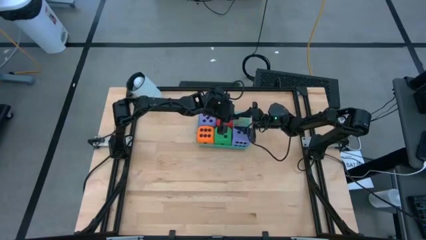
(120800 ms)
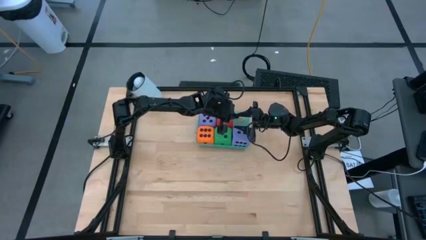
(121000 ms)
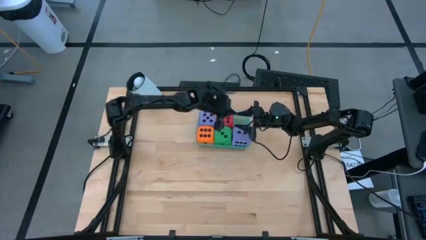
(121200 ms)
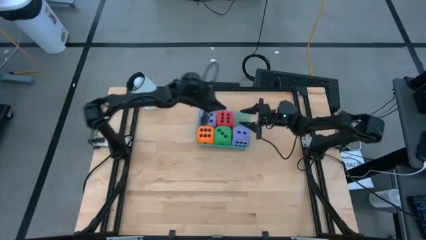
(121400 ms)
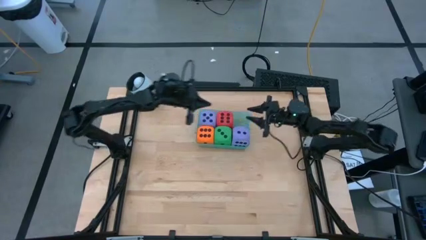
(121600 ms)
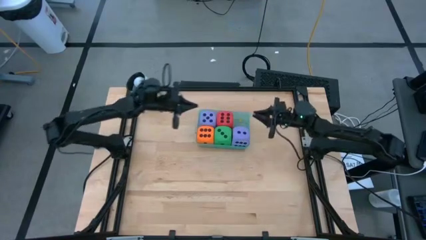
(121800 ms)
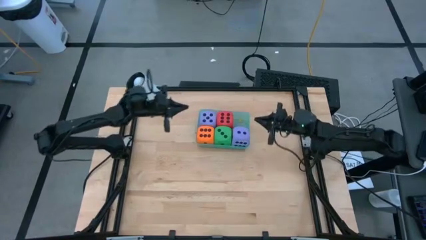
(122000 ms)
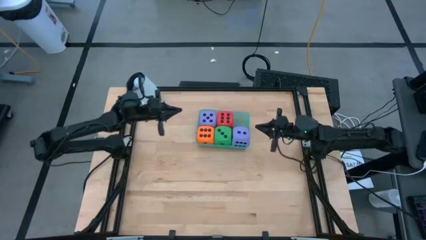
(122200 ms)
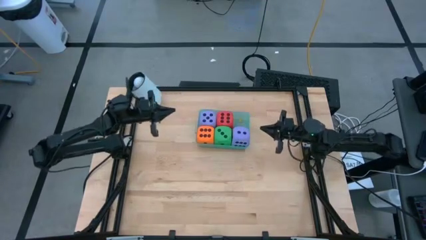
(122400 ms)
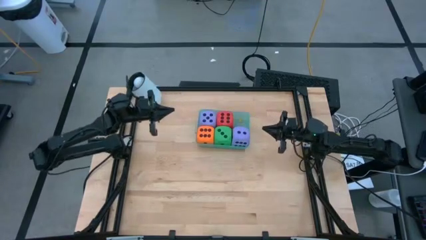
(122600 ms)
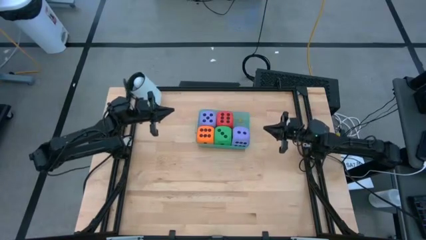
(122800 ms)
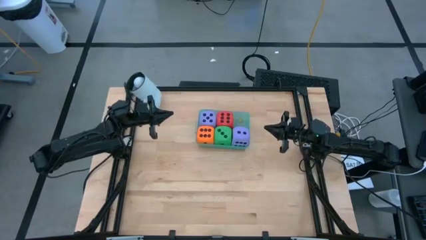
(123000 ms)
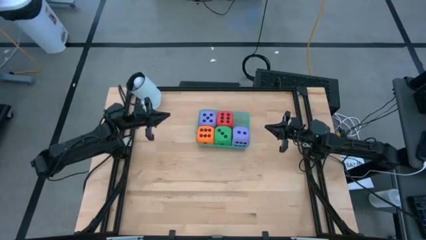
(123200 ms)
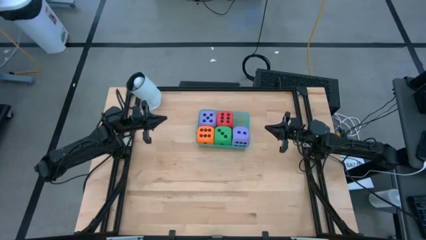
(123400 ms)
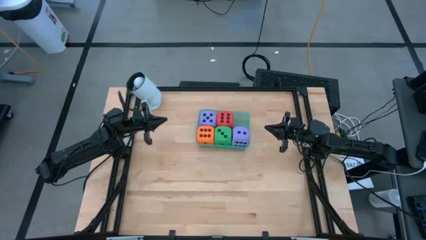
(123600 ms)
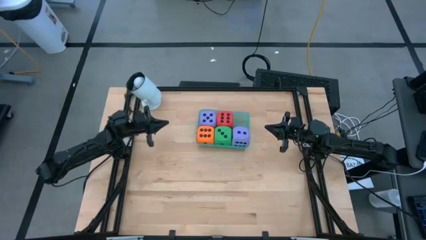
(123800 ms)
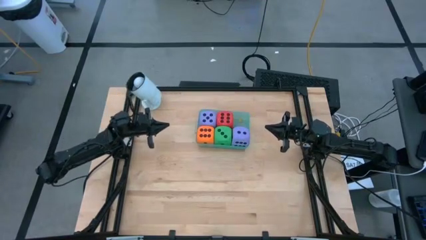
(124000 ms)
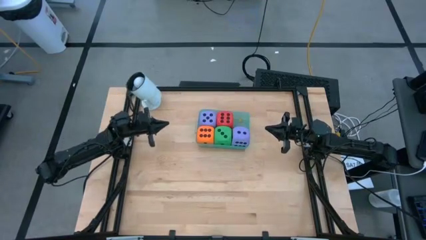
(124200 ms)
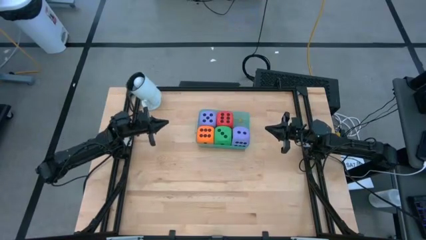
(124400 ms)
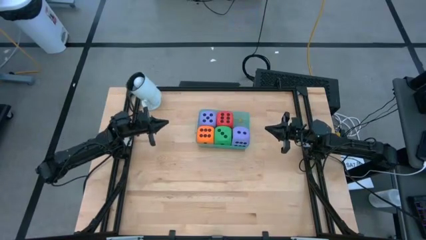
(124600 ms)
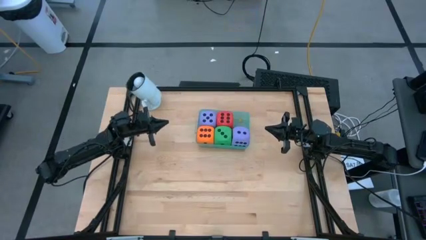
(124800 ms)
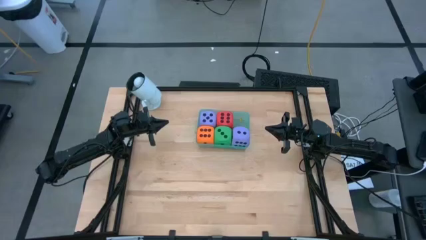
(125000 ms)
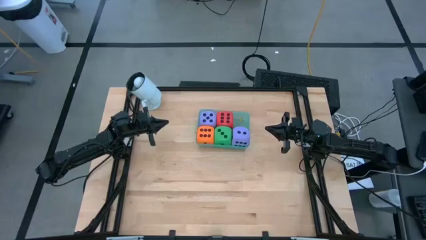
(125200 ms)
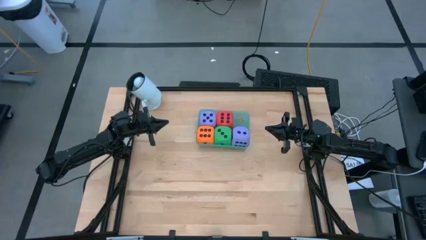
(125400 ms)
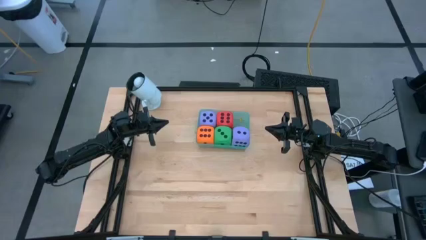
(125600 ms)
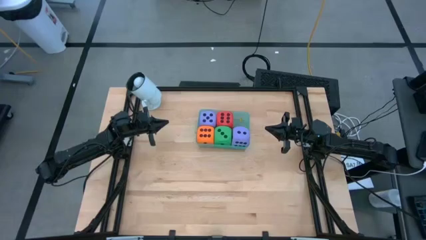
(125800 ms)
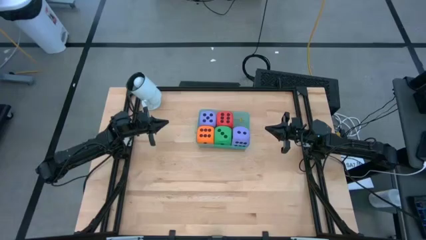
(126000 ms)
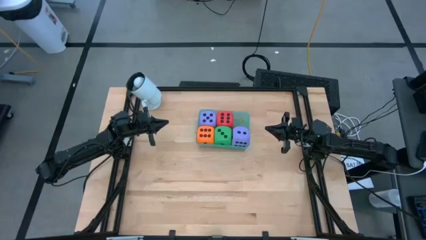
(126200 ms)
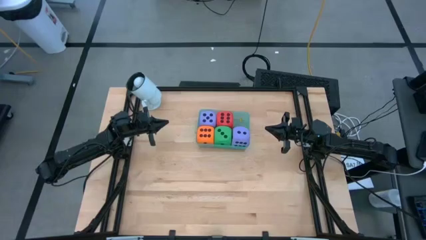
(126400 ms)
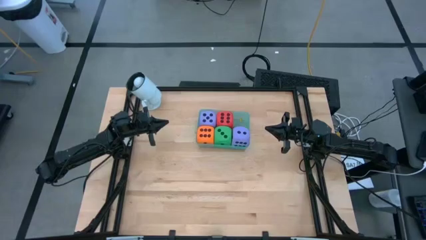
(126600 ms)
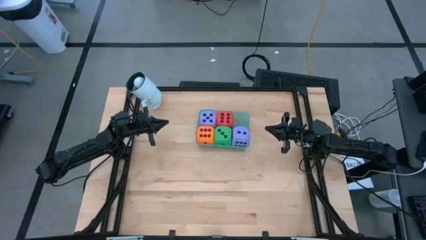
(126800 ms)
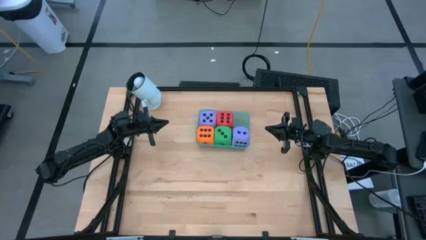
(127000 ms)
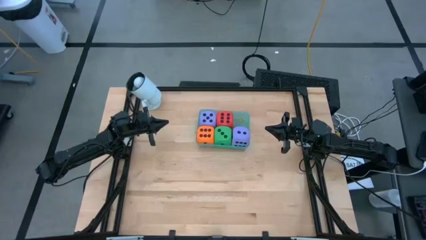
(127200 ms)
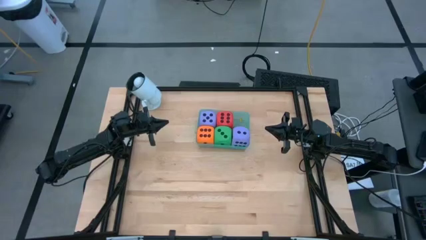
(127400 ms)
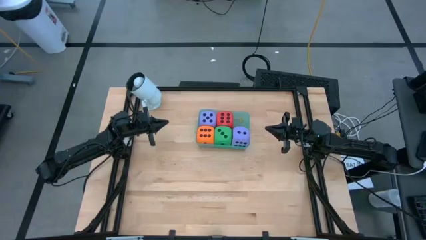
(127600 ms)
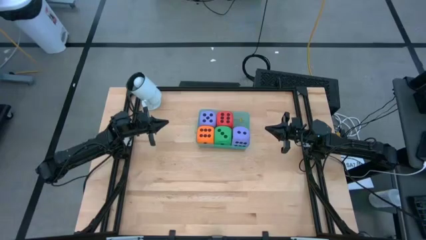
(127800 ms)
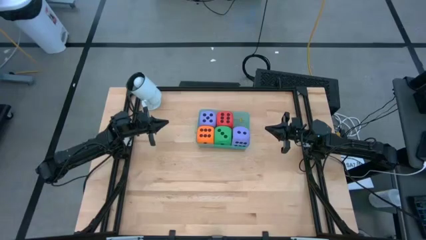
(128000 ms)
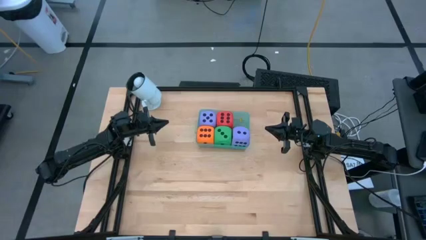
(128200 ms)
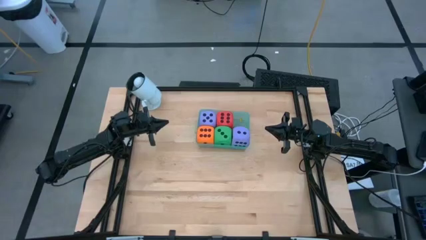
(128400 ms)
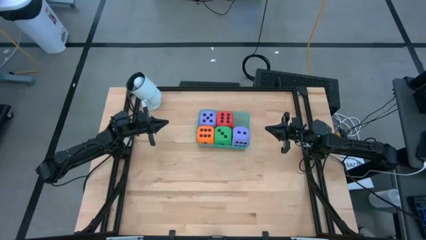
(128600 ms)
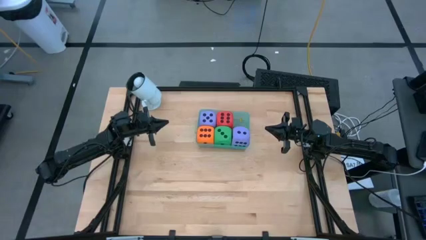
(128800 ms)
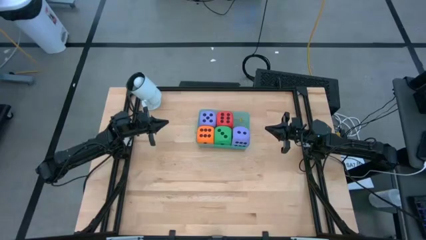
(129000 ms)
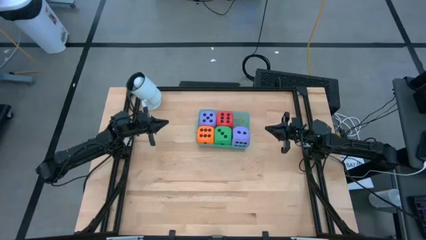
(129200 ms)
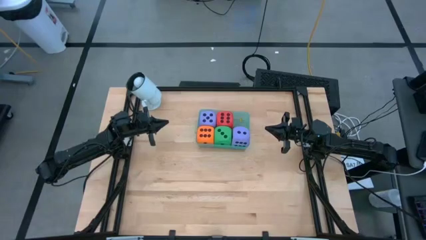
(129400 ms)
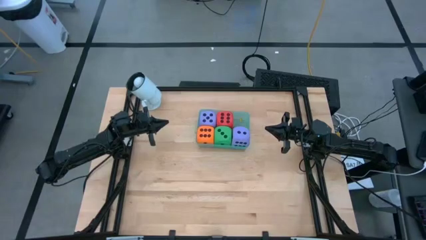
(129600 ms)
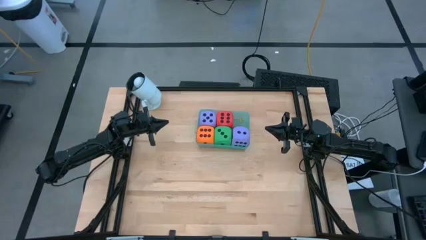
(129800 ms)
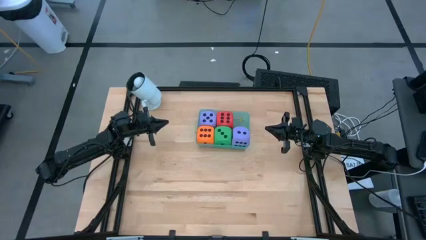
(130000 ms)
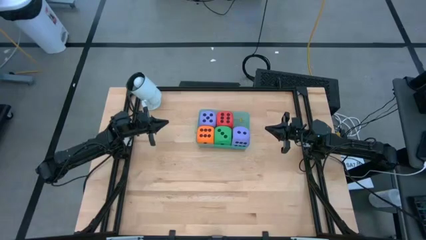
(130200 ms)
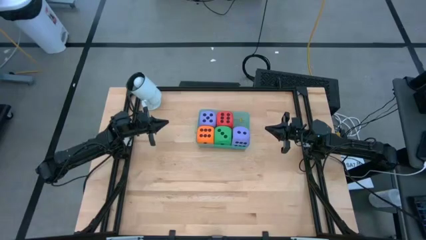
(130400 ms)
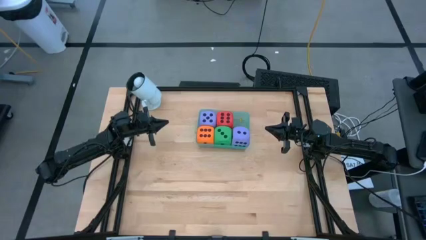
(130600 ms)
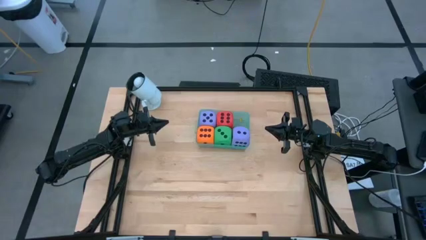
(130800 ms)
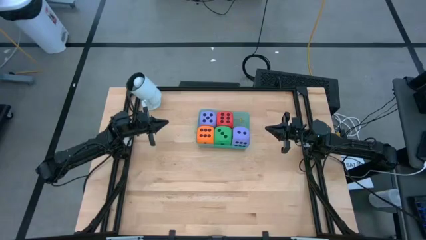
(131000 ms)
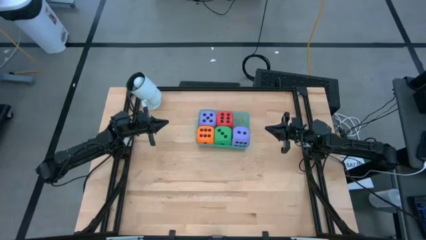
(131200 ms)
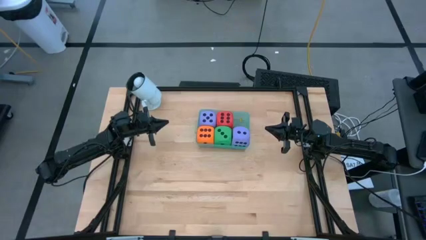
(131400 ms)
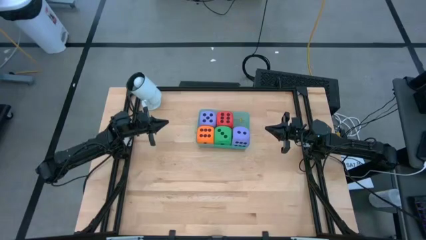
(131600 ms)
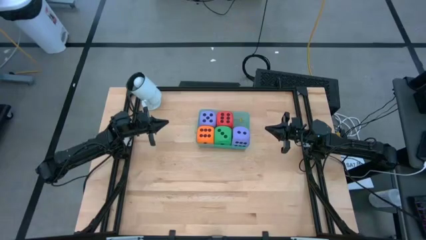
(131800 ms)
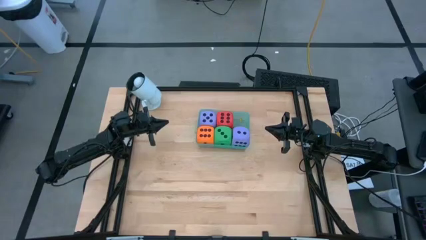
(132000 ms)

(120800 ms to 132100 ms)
Task: Pick & Place Dice
Return to Home Position

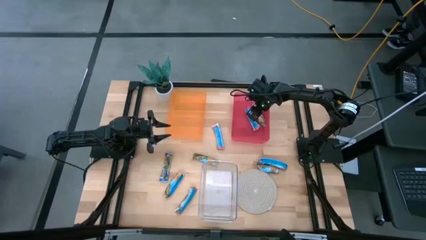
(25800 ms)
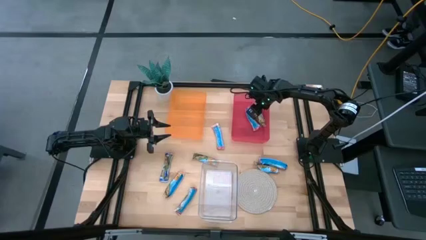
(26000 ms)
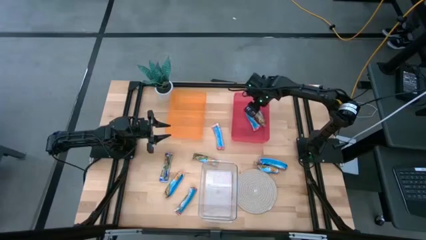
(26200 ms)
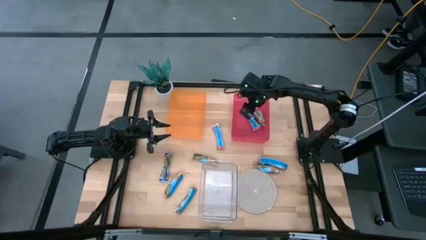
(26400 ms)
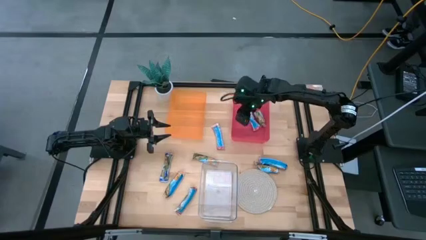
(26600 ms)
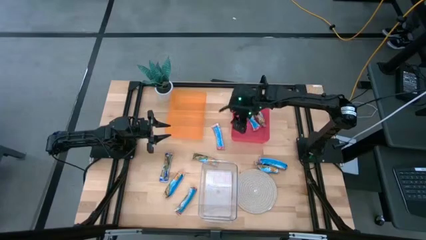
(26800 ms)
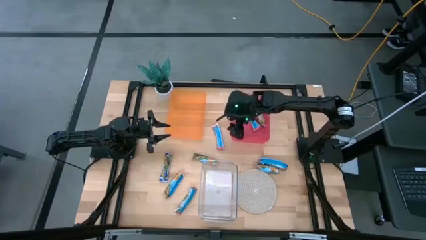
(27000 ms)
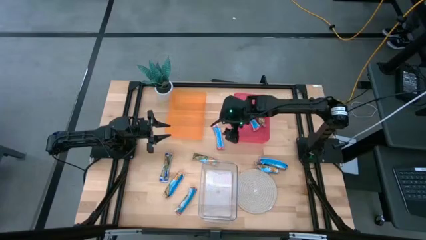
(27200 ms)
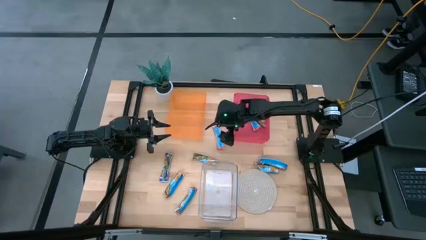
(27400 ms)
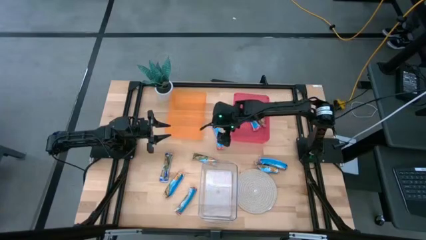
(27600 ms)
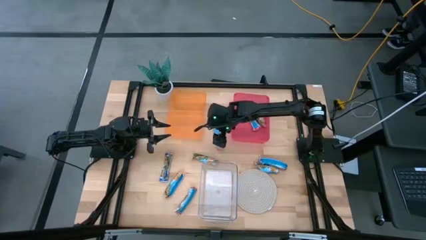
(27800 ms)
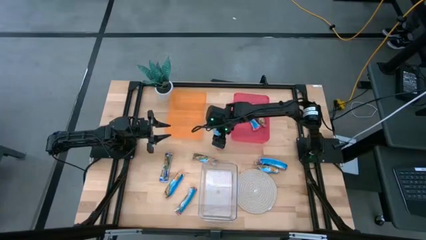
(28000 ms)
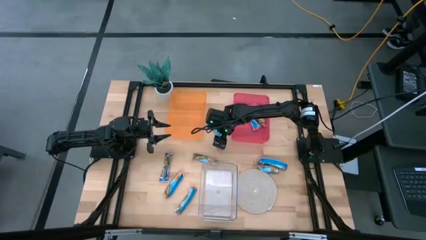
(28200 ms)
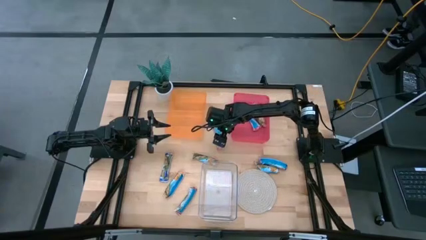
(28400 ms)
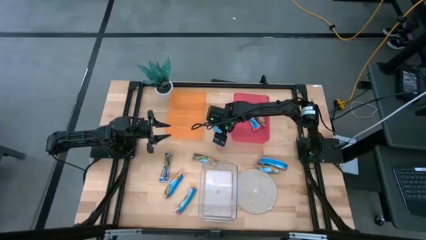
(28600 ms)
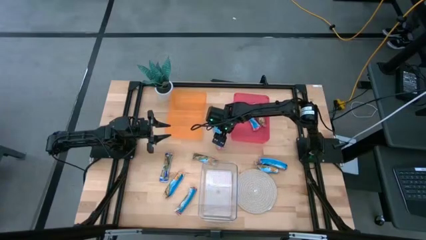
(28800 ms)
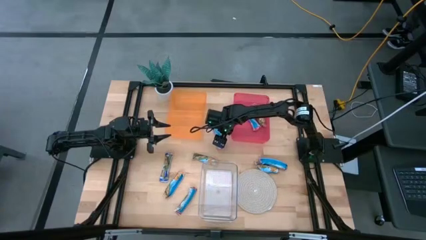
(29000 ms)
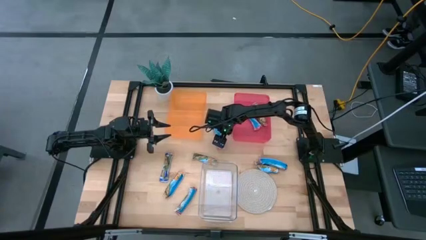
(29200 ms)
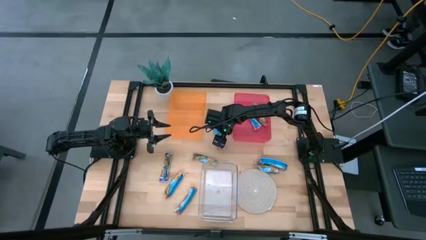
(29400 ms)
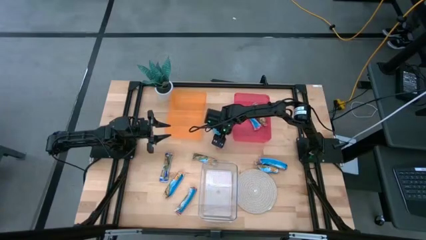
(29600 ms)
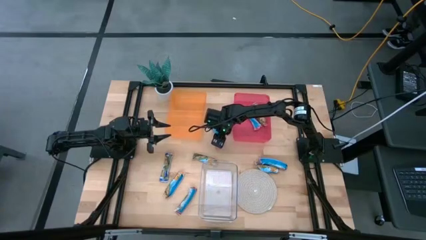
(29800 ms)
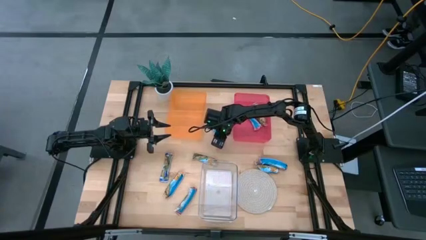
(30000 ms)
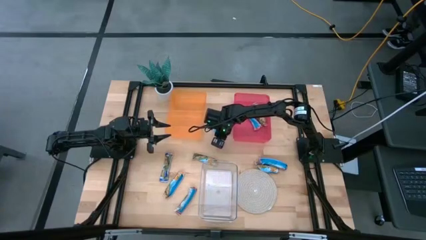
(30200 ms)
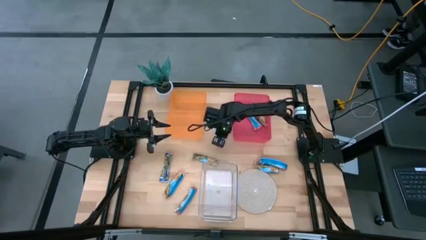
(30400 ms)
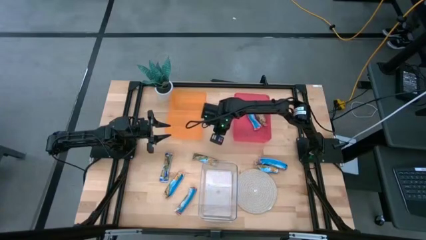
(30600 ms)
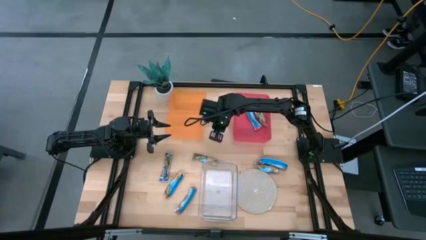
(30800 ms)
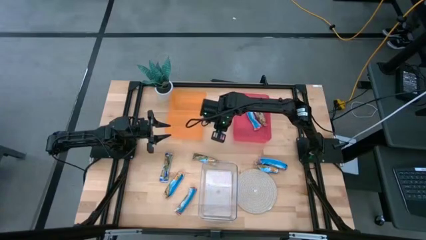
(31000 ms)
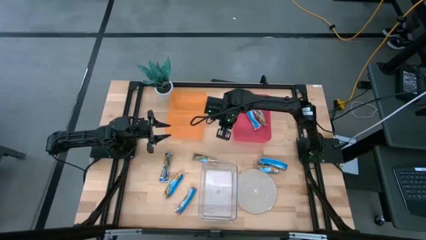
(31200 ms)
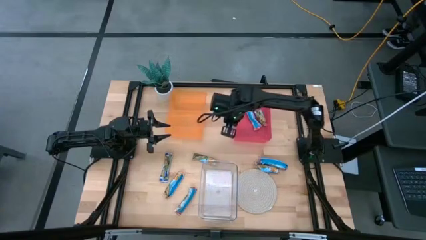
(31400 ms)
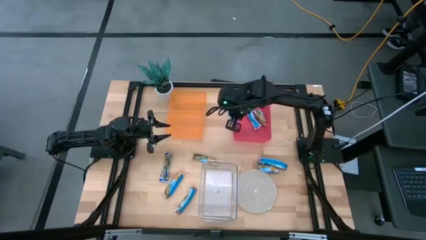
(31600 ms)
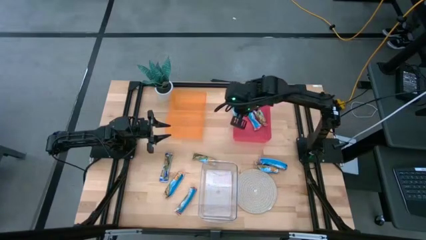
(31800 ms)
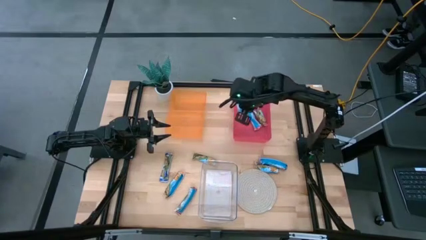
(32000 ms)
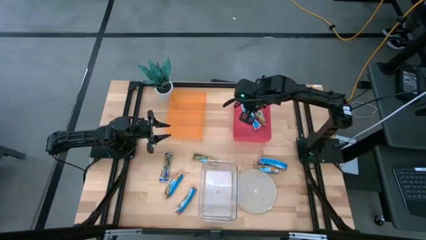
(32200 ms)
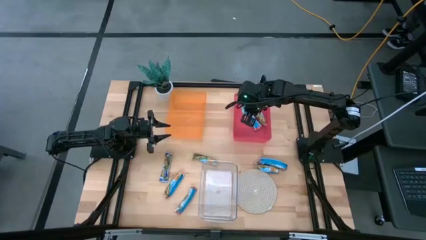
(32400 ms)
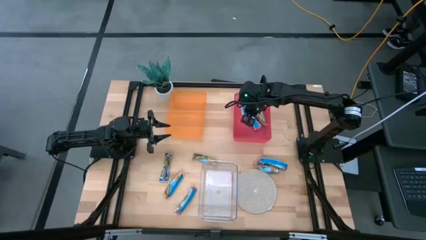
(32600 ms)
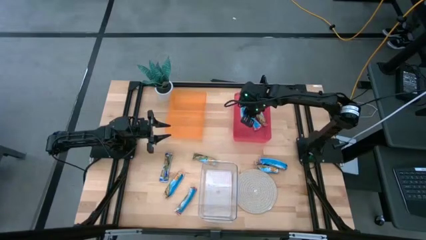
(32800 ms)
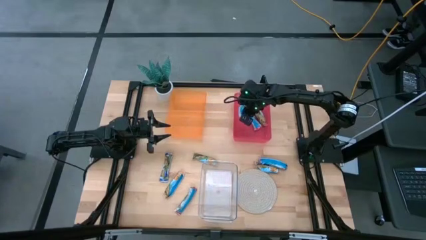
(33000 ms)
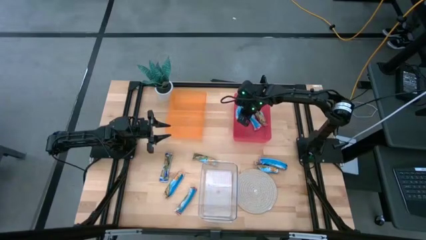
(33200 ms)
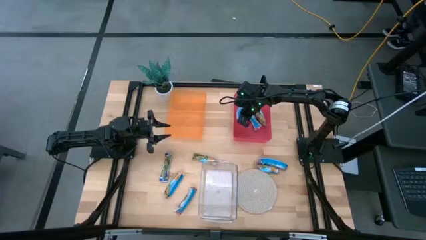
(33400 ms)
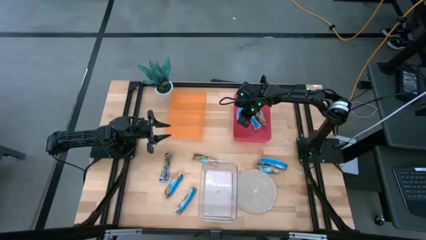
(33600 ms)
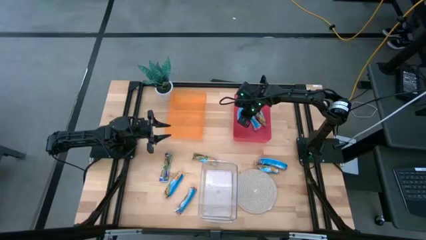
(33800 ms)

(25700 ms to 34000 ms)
Task: Pick and place Granola Bars by type
Put the red granola bar into the red bin
